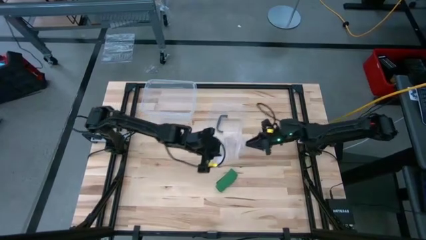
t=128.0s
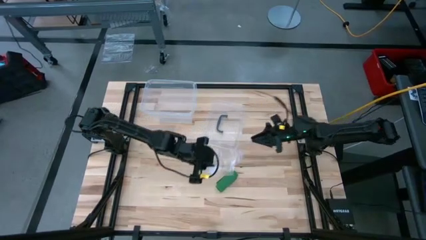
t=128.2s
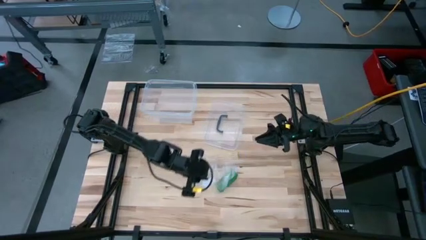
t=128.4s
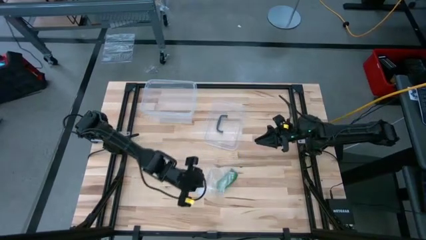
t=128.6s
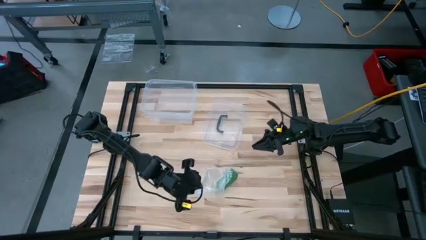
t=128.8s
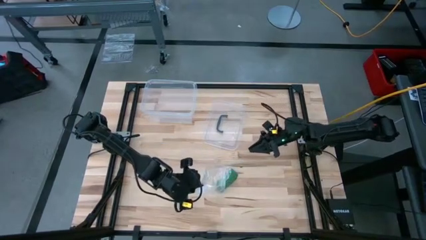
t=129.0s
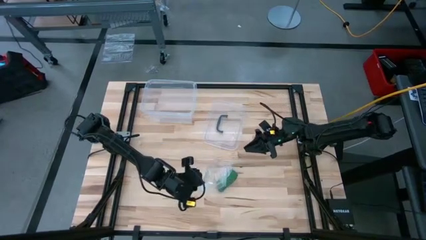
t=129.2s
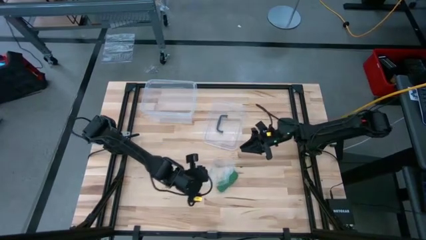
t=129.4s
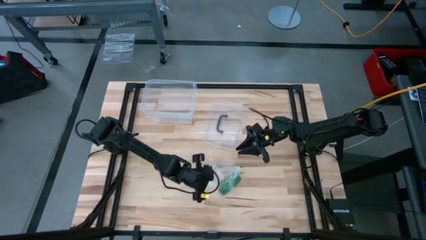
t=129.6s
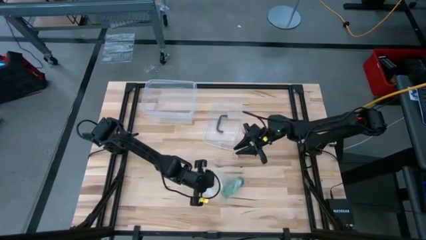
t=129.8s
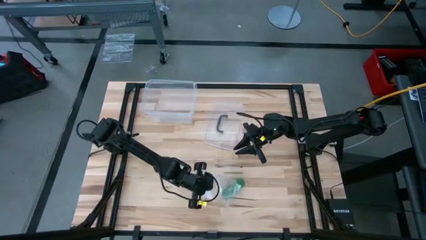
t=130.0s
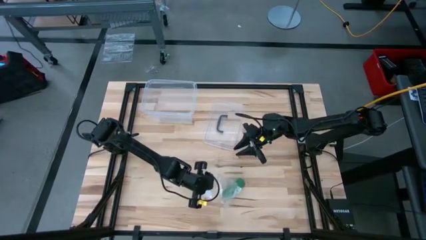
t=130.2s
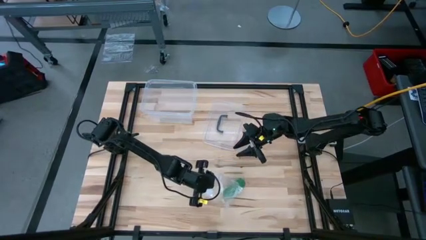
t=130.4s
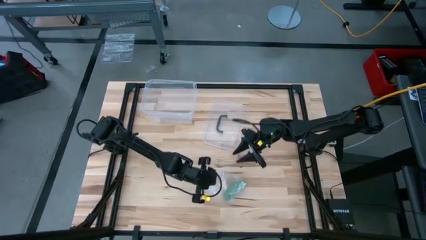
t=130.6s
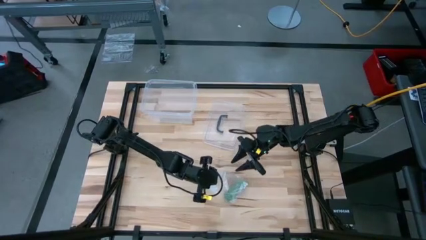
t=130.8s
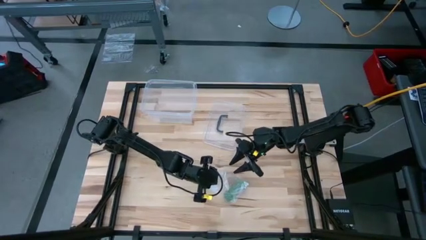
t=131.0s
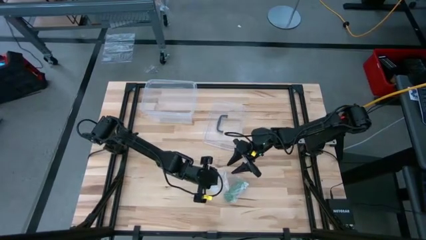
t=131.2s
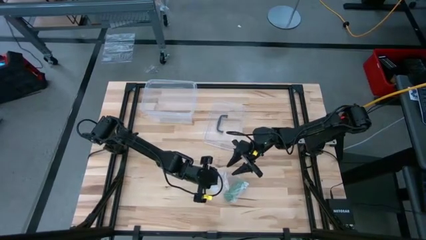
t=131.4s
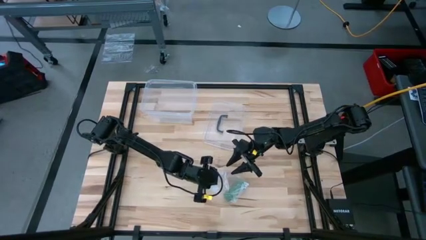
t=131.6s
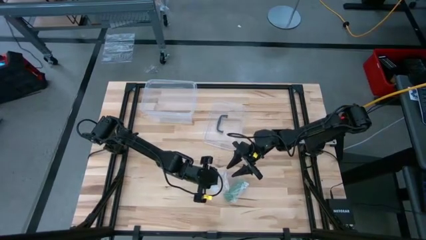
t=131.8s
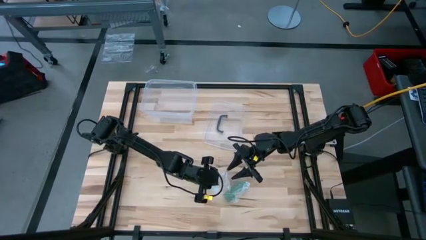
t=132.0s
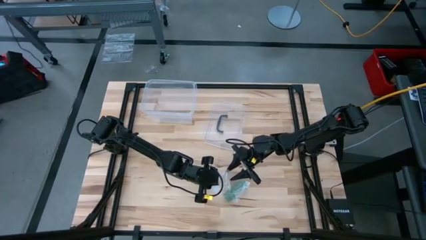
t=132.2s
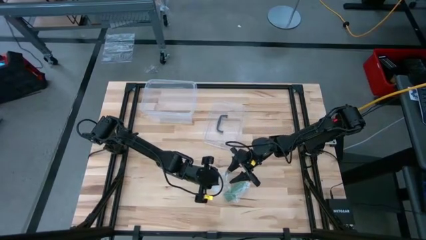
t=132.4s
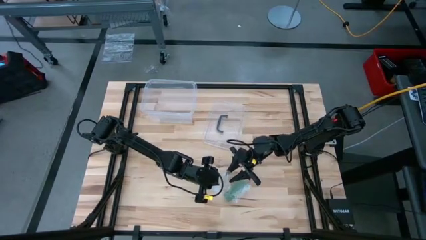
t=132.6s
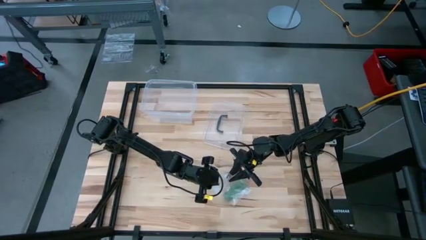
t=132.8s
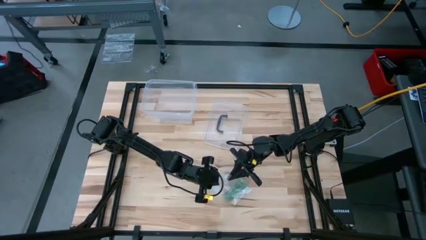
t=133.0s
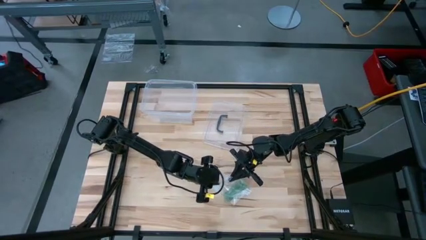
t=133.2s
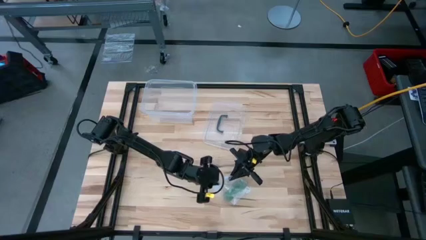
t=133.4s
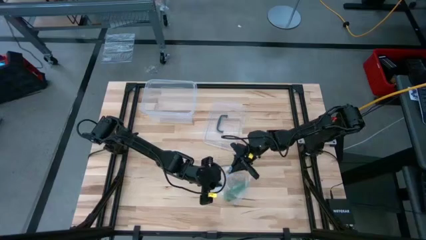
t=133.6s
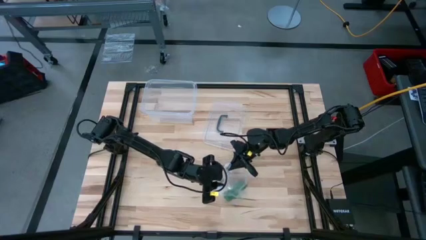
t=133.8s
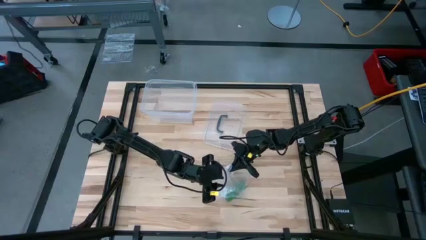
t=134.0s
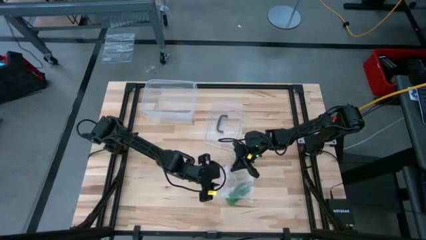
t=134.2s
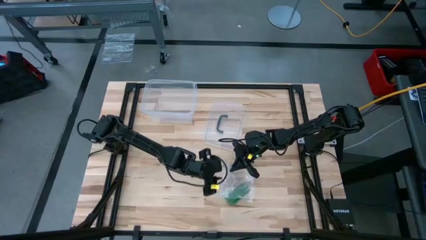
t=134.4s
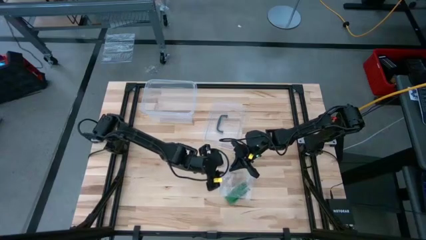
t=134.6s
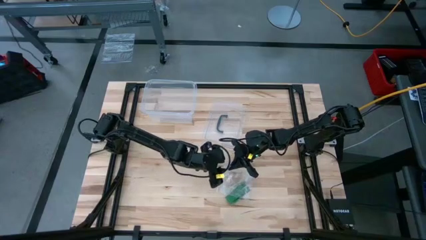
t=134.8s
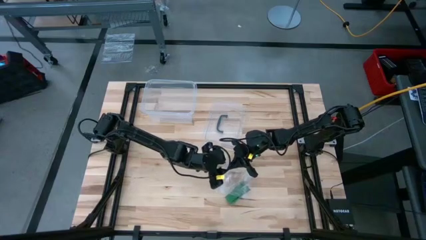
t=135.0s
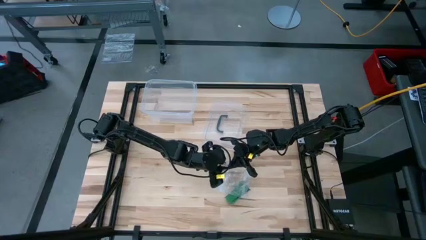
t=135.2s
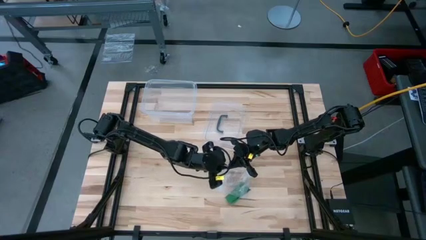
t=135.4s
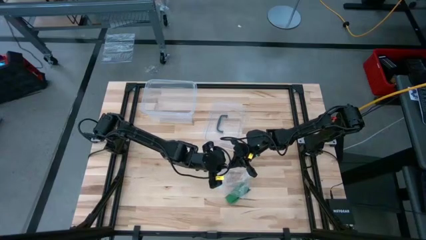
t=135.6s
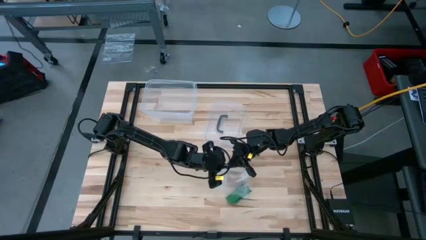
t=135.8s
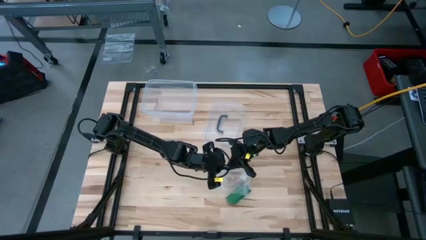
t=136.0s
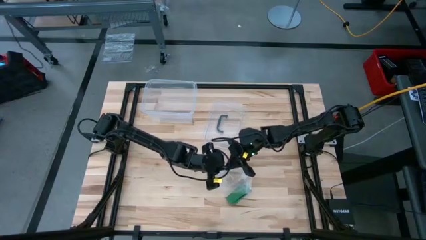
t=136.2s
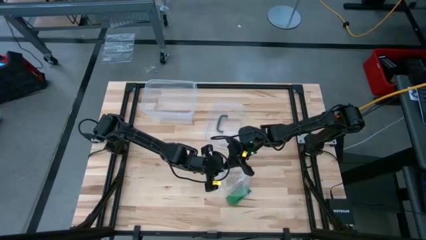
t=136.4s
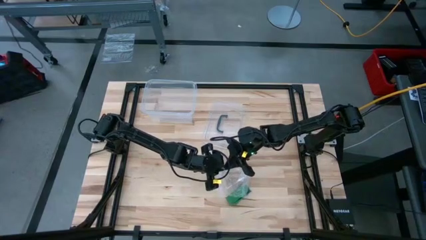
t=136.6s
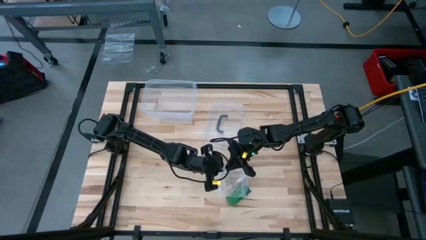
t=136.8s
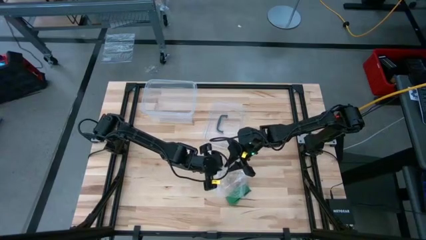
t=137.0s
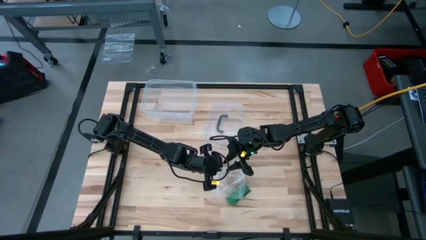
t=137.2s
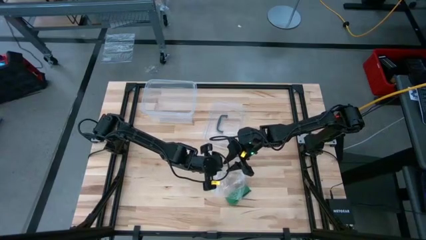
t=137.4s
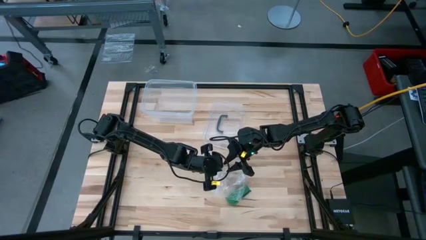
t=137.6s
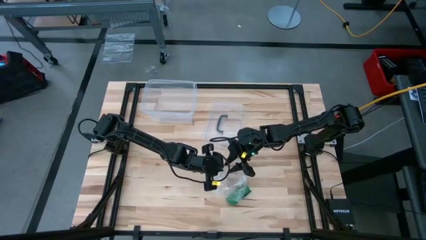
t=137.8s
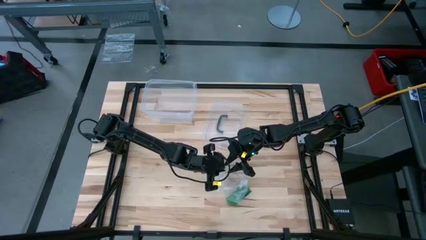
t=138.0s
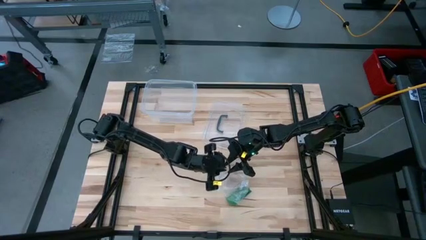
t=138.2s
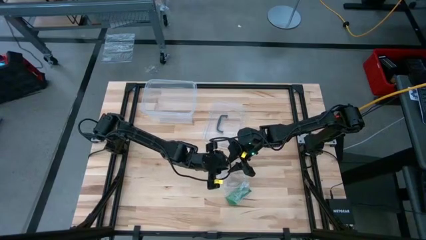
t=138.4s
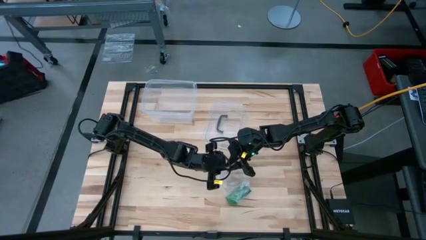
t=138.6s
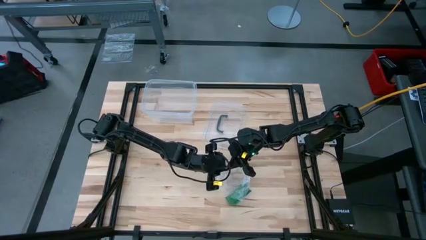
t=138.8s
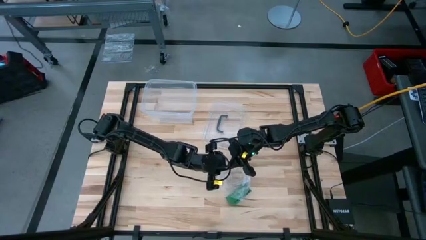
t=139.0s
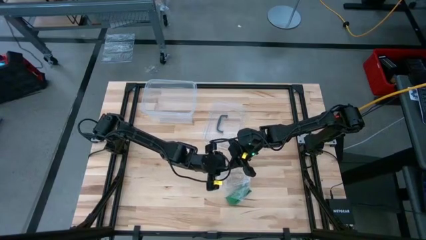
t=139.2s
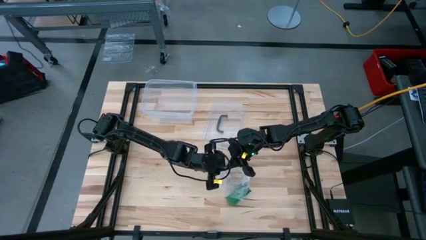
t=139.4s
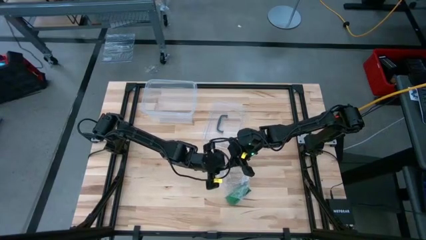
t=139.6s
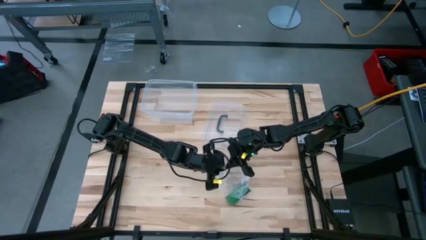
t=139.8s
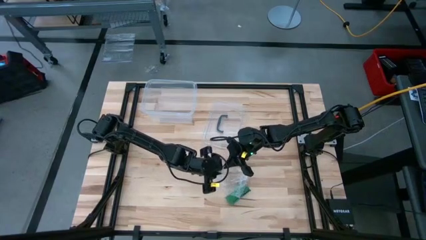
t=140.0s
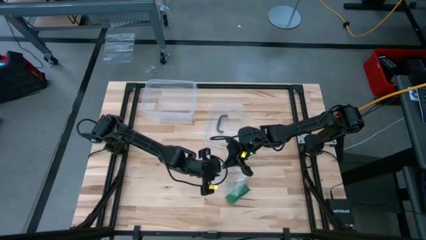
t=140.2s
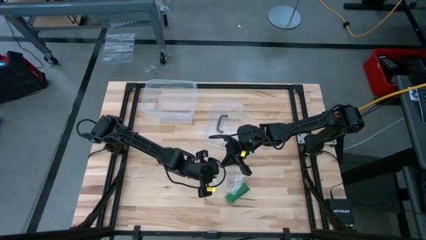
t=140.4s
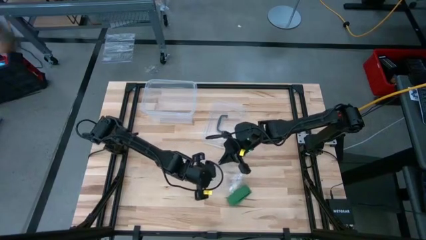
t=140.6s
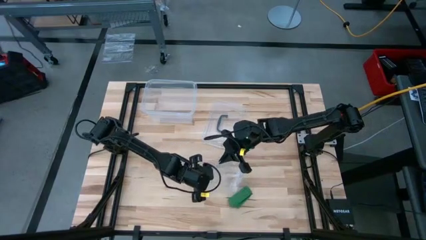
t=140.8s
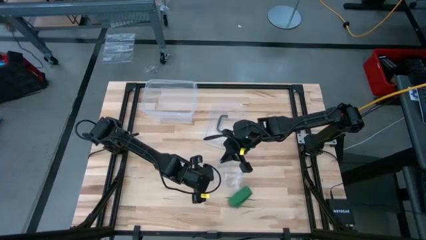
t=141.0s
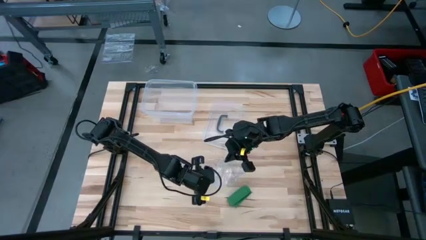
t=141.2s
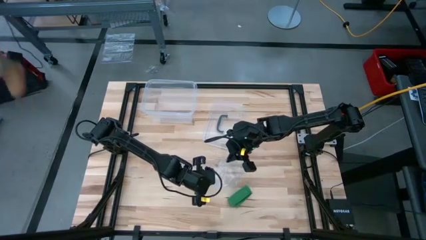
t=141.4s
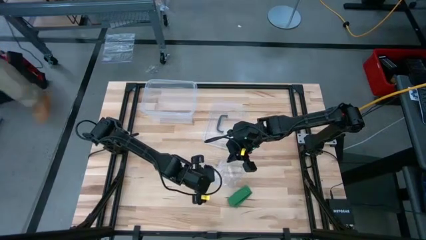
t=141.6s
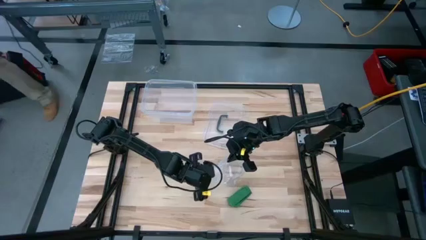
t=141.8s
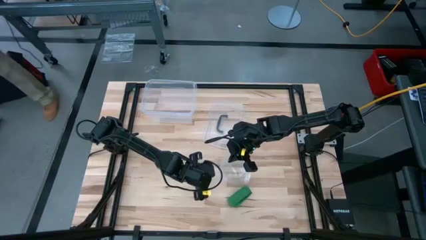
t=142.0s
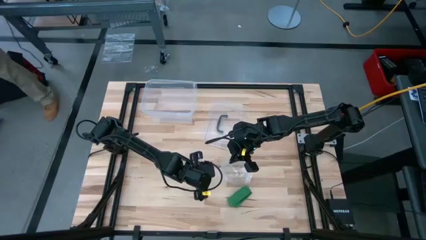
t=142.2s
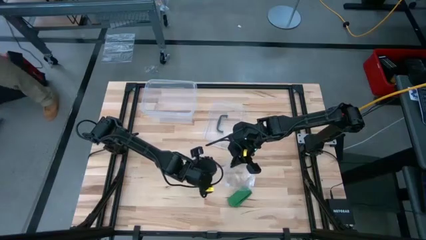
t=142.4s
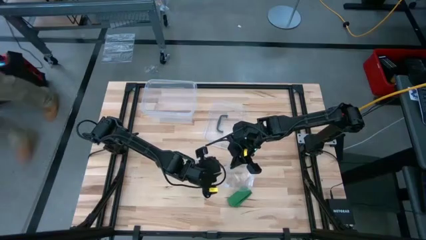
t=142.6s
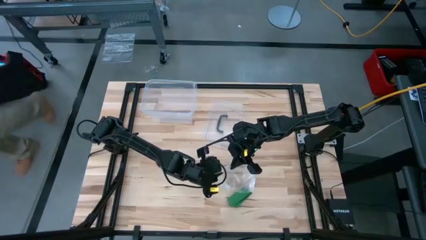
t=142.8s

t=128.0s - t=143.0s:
Task: Roll bandage
Open the transparent zip bag
